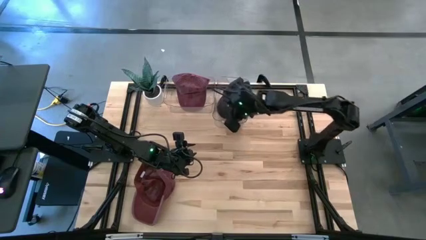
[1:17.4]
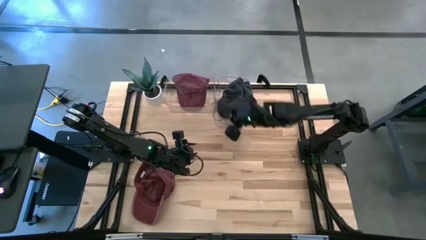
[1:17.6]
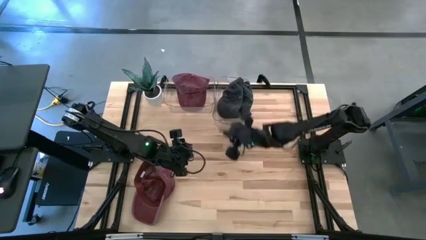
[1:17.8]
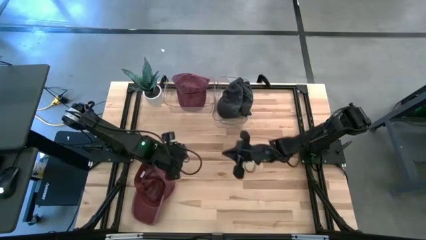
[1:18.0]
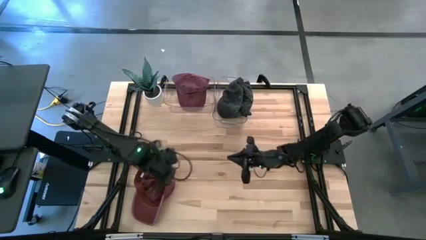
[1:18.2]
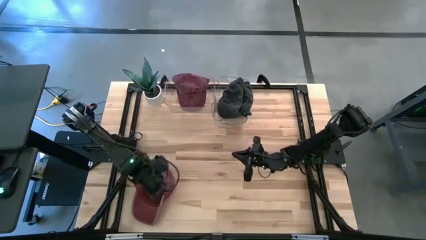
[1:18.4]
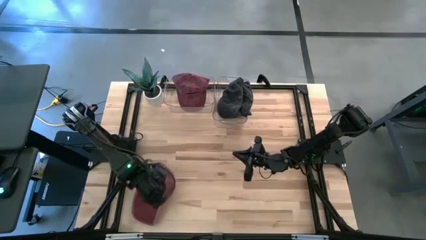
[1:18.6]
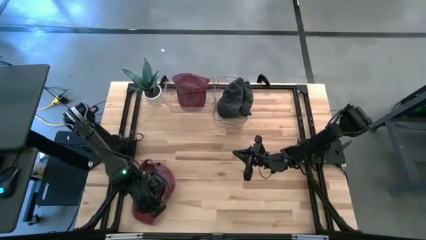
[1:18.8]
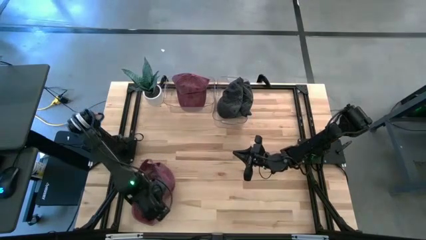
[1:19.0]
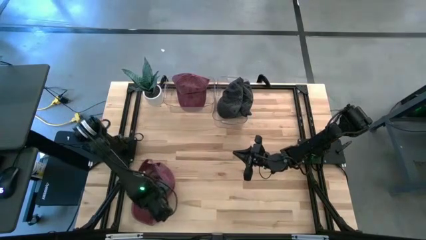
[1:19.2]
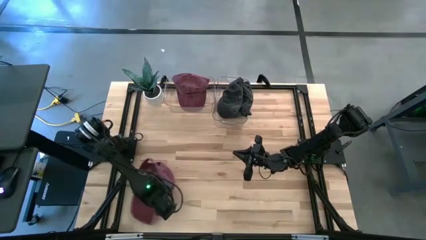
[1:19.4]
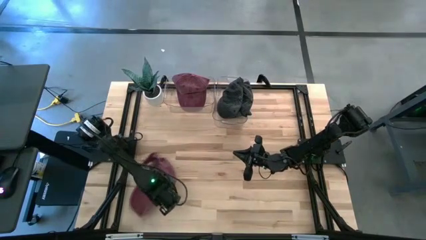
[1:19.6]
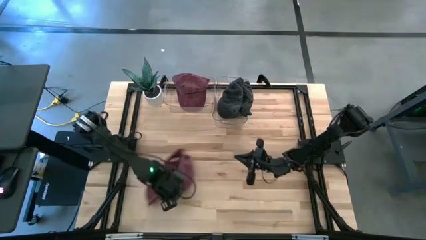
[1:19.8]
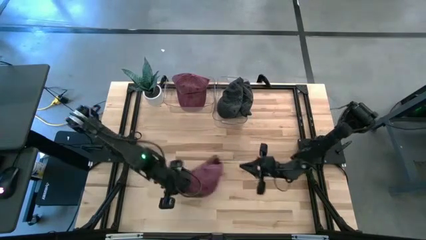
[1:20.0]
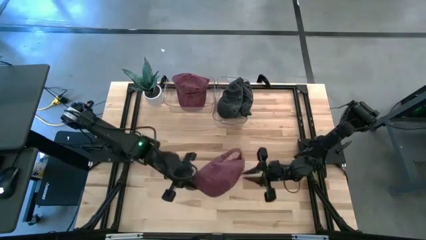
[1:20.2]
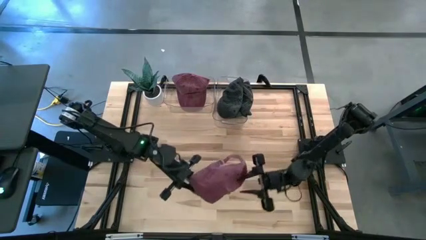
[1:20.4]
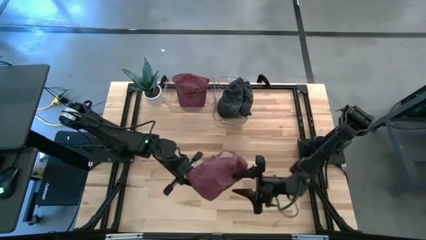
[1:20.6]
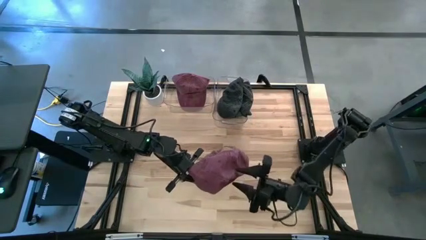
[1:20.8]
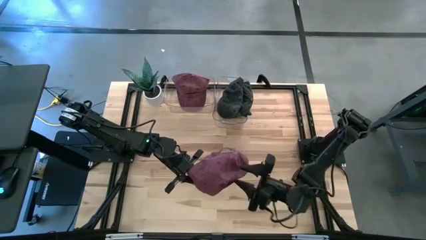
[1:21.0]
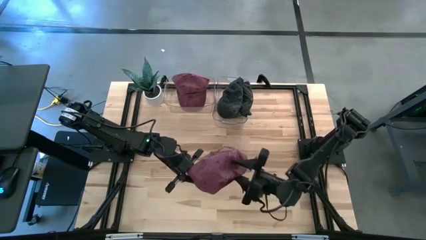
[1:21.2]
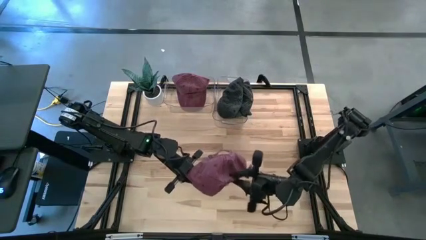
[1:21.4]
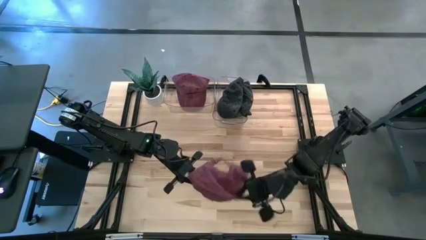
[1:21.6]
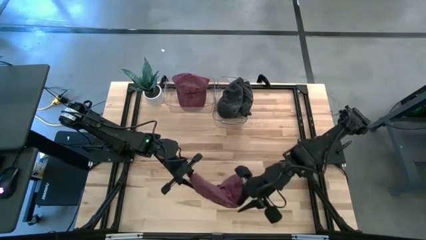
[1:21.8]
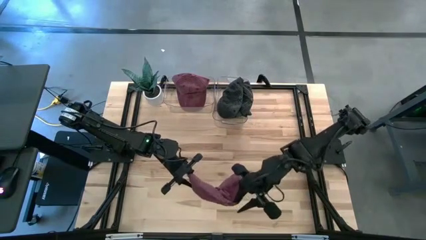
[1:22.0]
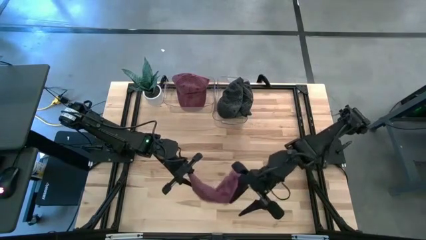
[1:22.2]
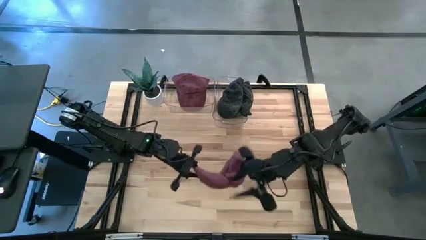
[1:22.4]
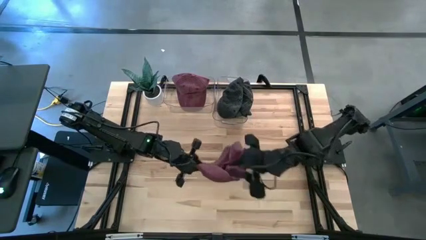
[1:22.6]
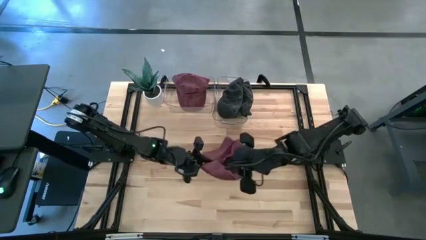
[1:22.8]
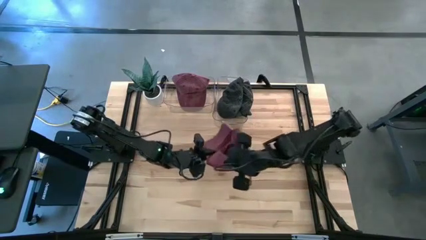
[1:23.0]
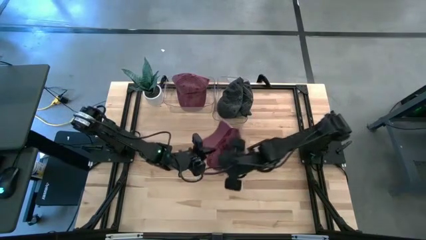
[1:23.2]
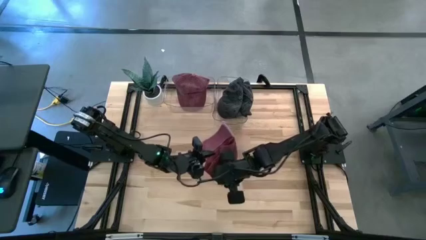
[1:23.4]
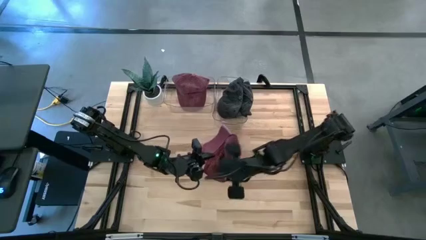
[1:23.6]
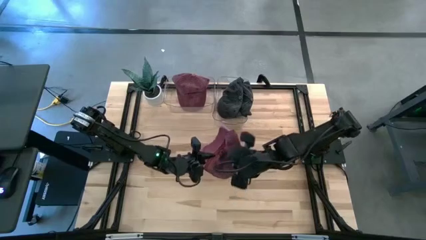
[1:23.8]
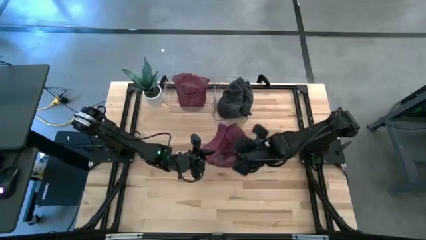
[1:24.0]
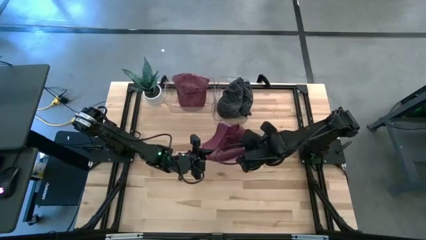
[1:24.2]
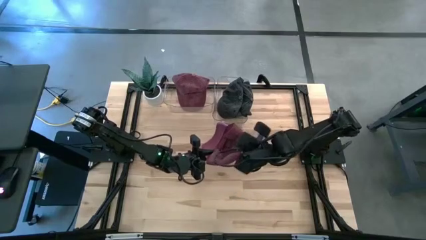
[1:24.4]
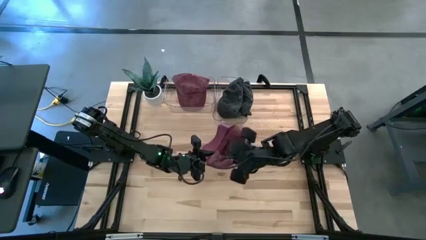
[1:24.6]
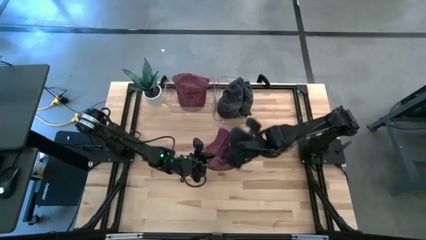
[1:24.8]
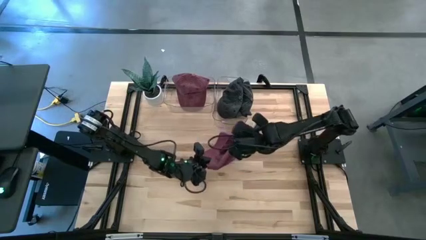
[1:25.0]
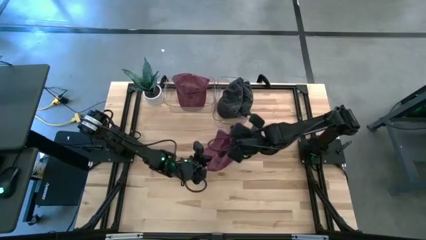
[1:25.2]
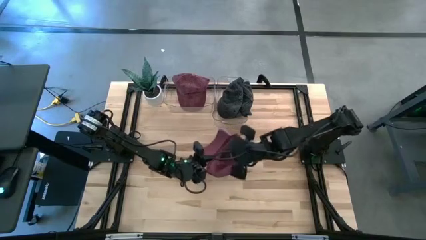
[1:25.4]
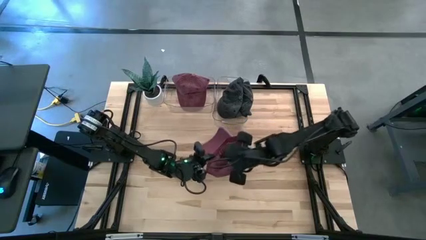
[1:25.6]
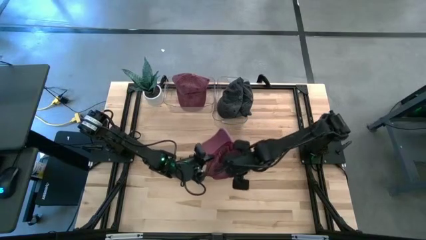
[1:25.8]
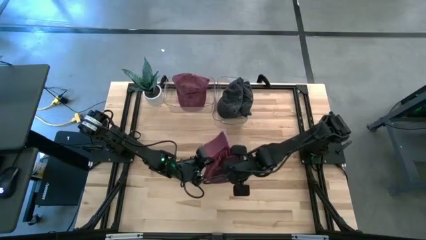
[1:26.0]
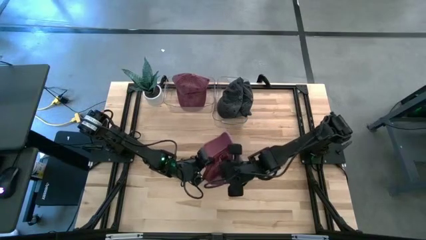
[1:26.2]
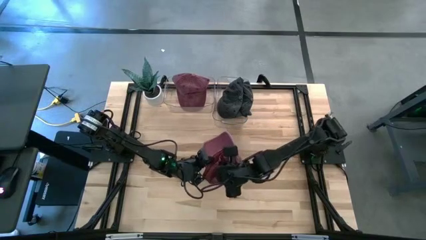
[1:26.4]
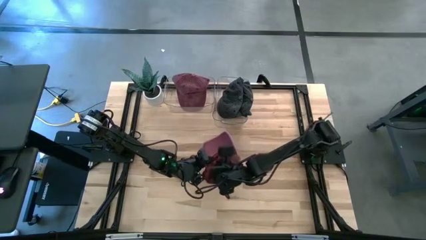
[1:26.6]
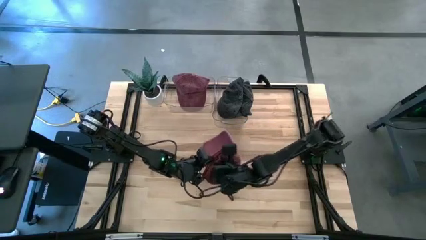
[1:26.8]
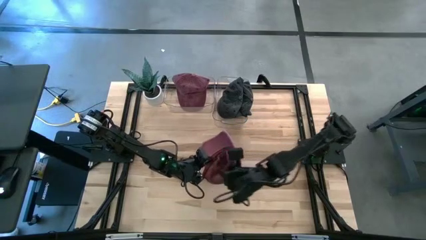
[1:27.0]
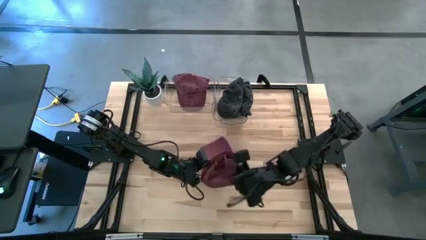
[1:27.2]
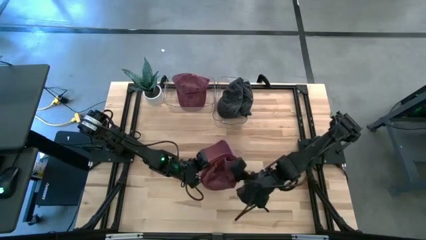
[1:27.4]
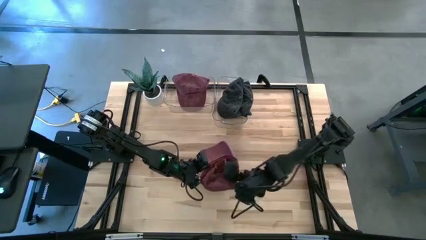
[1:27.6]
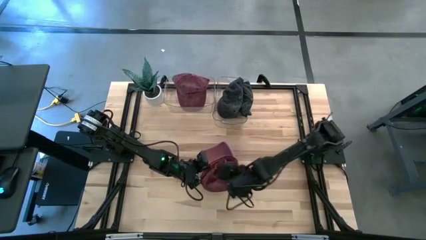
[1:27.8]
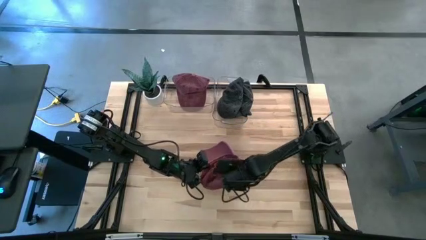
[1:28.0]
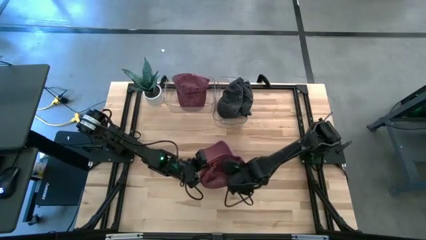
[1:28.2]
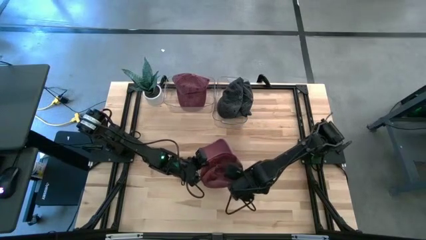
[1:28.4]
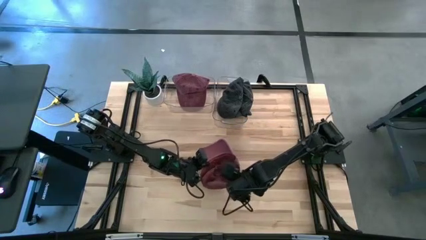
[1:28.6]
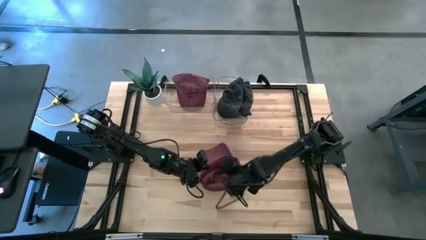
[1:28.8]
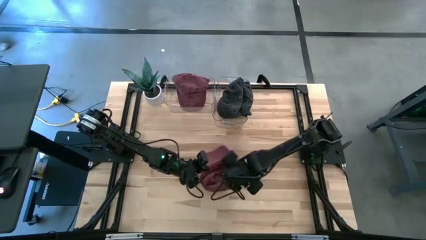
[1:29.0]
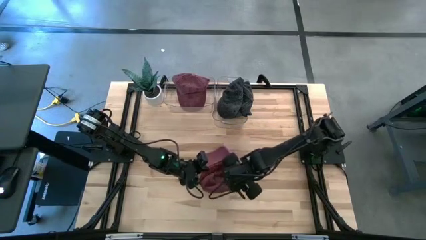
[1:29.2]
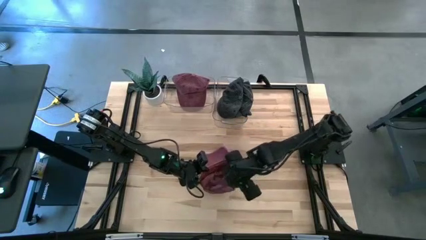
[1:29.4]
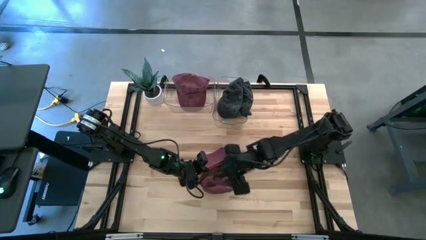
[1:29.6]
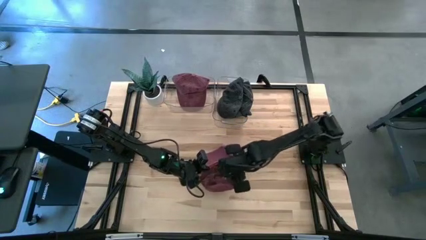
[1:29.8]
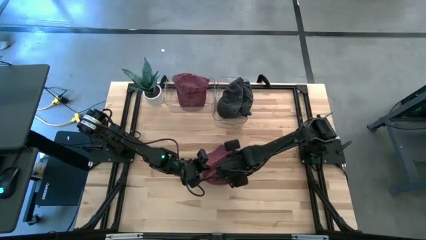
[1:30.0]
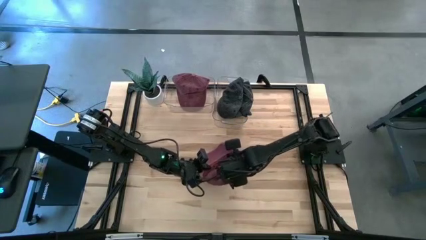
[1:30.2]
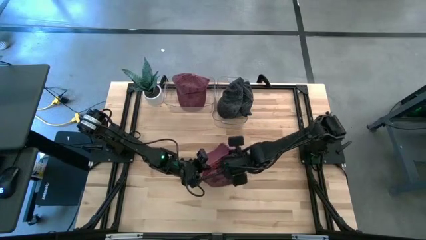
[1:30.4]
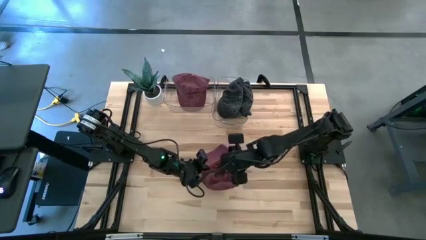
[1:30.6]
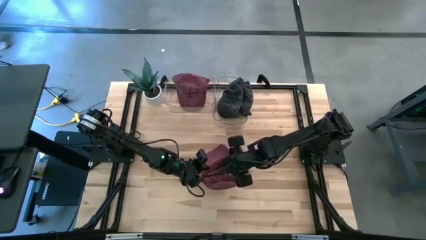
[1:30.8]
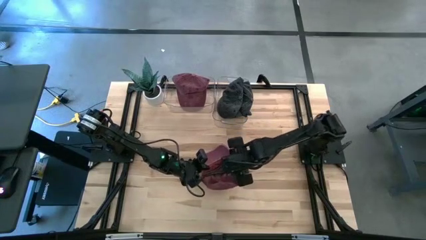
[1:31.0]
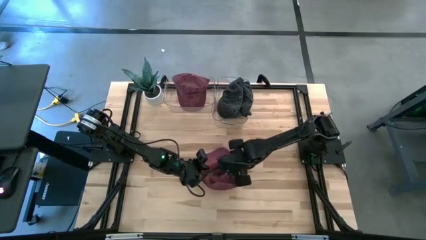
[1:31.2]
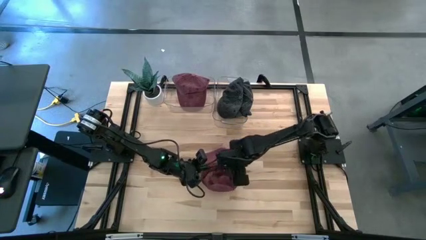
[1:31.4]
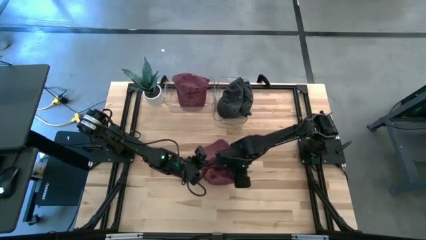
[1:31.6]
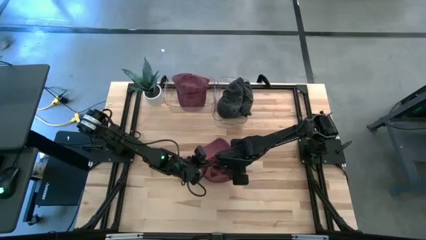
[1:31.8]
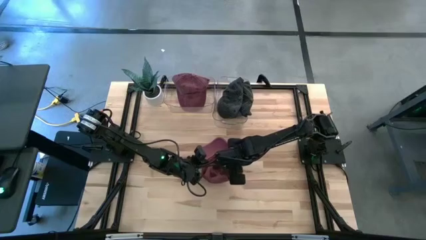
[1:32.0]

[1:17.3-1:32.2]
Task: Pick & Place hat
Put the red cap into the left transparent bin
